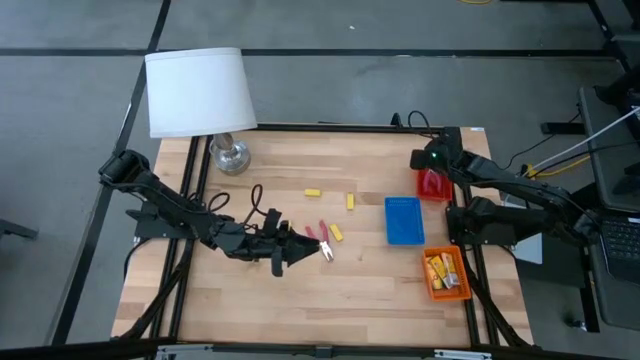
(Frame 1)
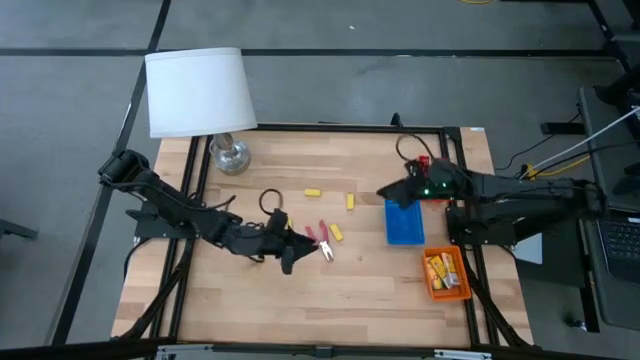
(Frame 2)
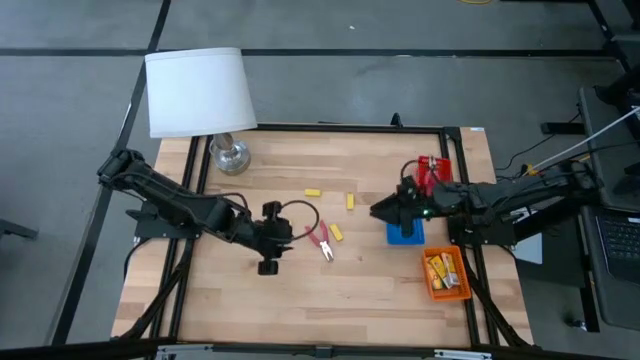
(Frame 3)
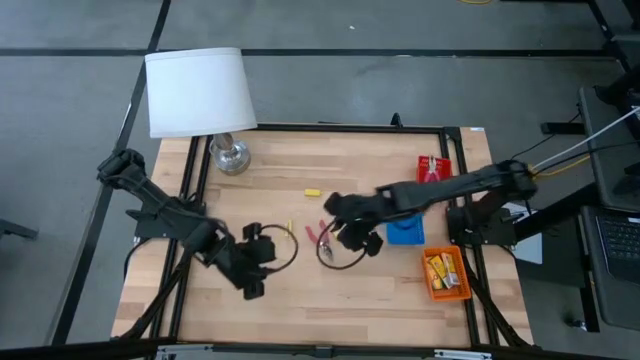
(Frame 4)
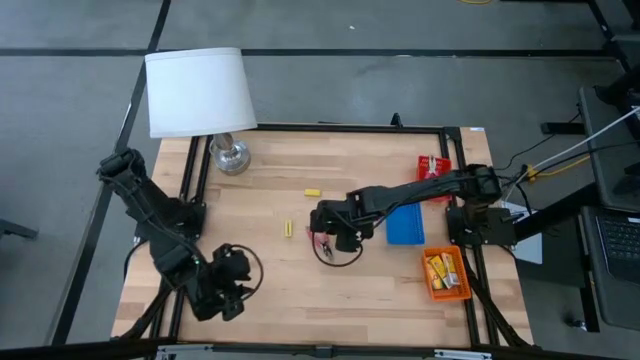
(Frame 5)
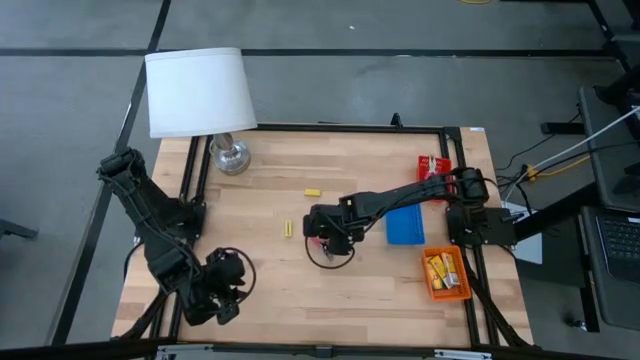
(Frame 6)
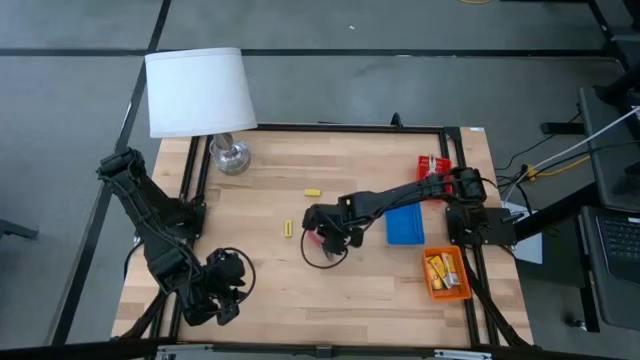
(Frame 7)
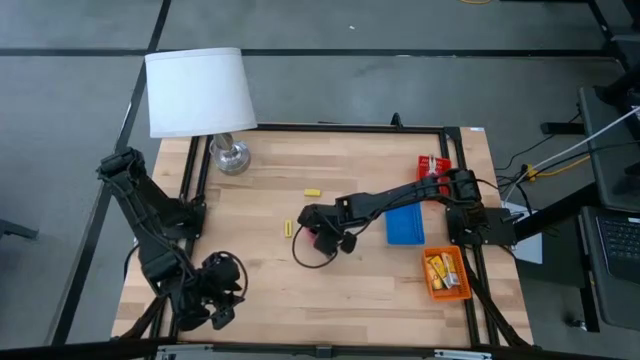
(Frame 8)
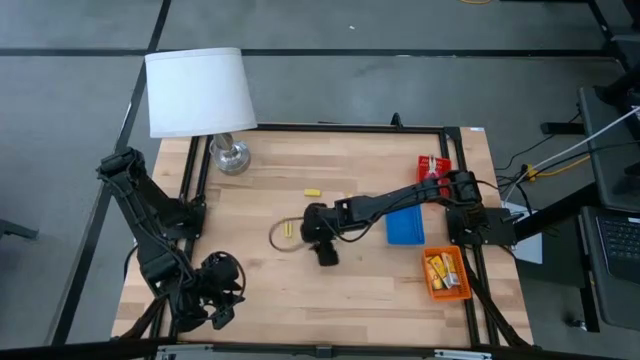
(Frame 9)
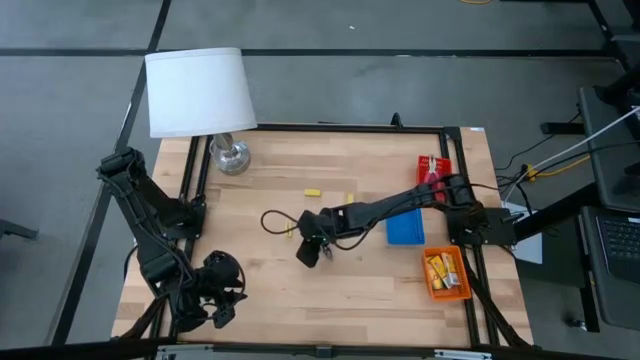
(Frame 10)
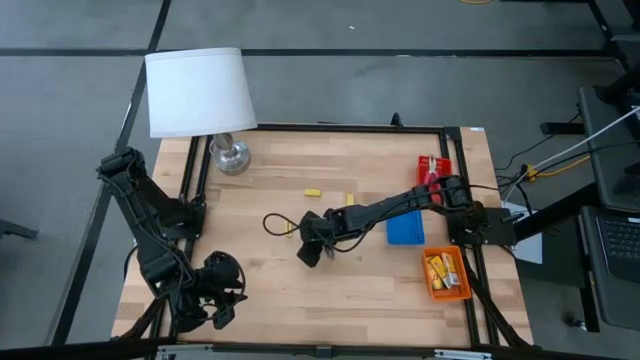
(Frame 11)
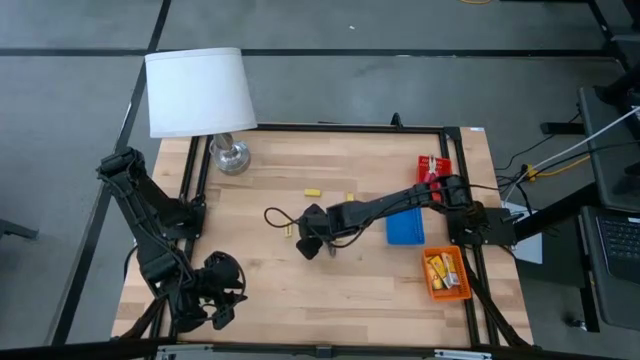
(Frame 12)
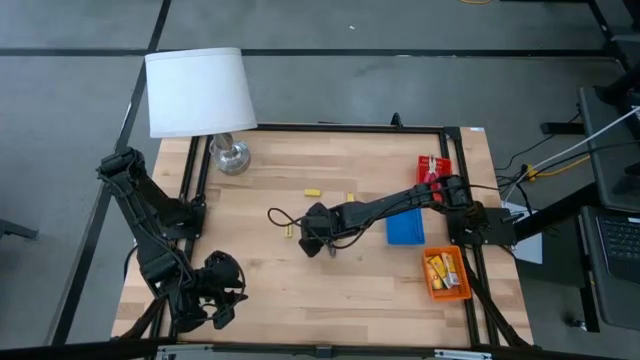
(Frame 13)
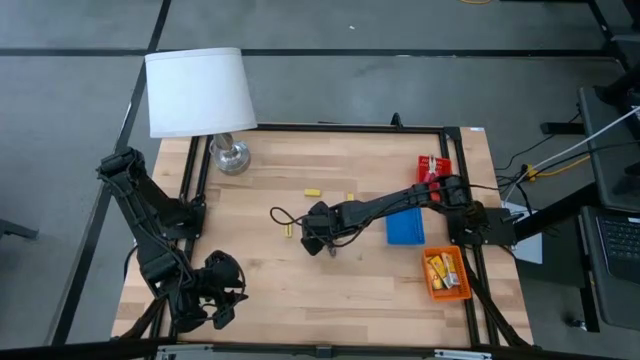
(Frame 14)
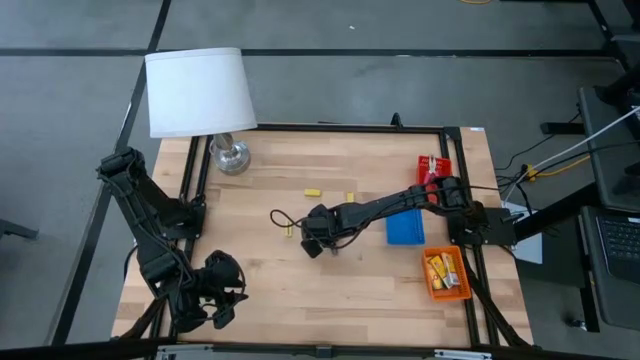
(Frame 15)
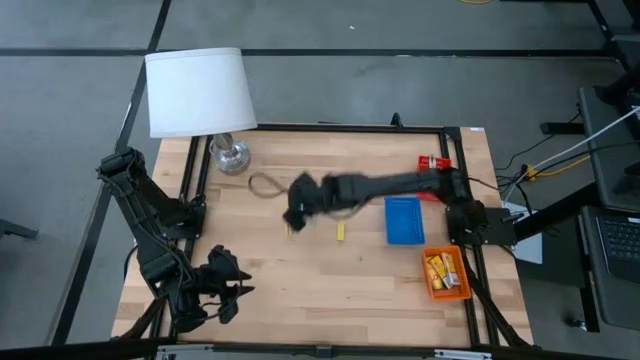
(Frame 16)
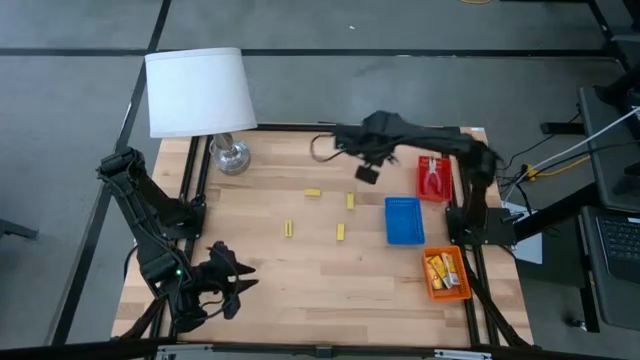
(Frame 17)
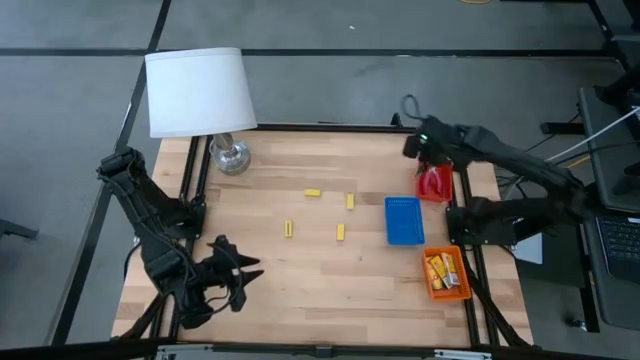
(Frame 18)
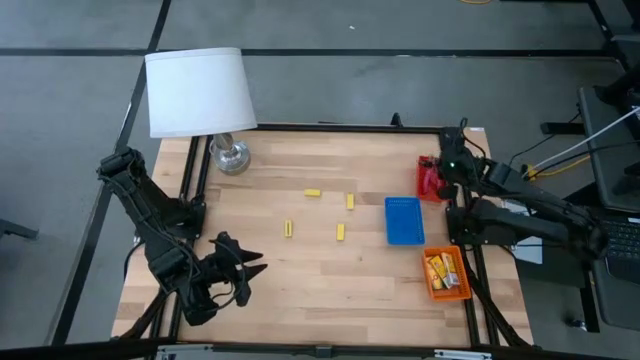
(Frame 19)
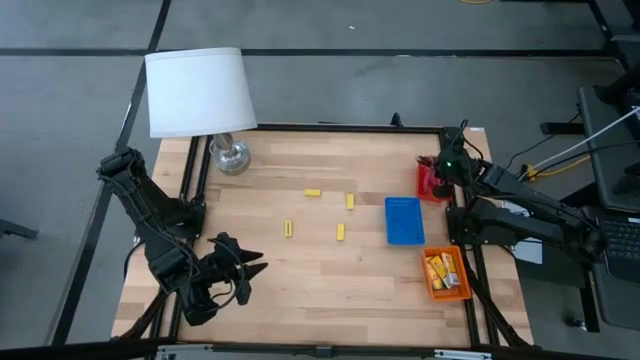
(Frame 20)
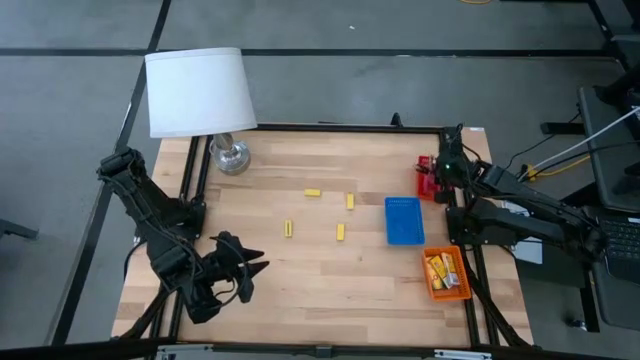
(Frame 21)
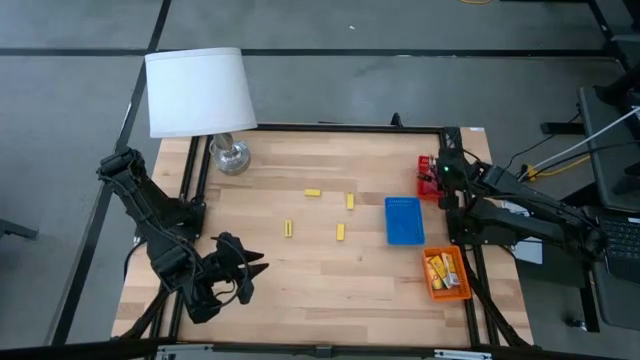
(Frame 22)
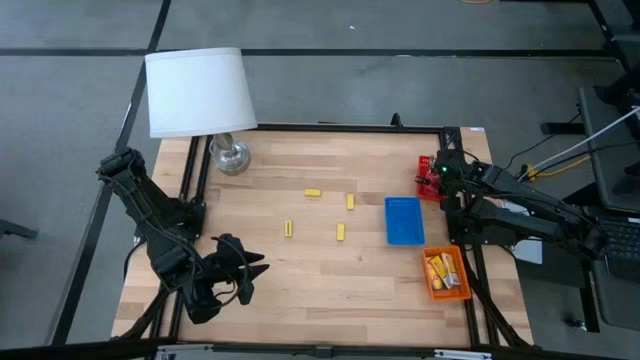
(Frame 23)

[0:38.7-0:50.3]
Task: Pick & Place School Supplies
Put the pink hole puncher into the red bin

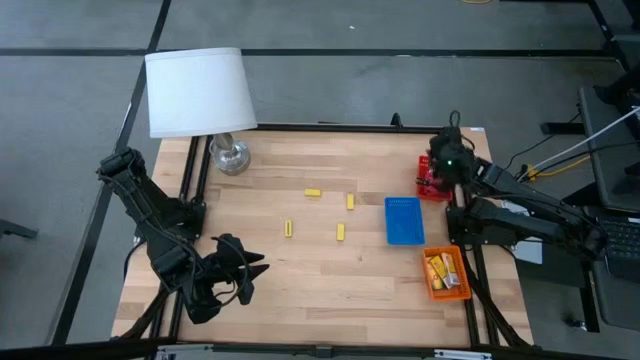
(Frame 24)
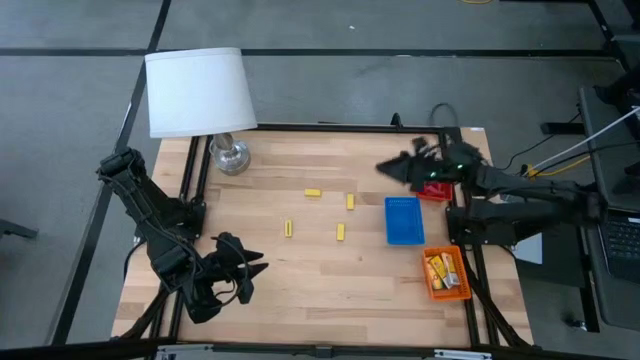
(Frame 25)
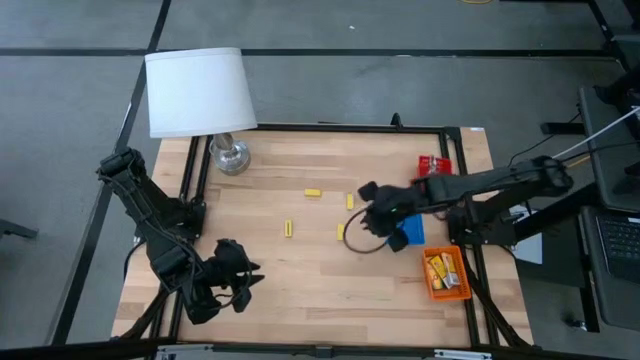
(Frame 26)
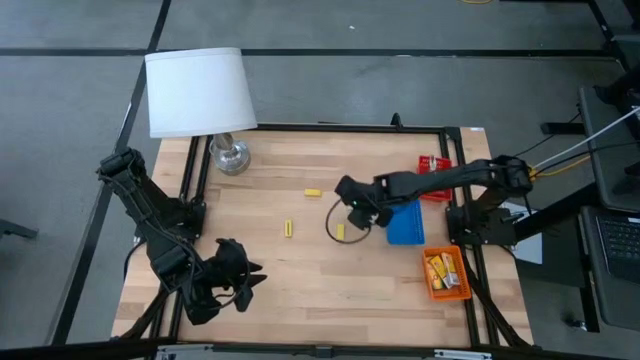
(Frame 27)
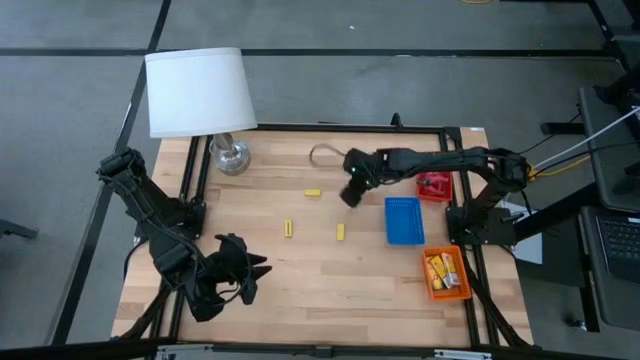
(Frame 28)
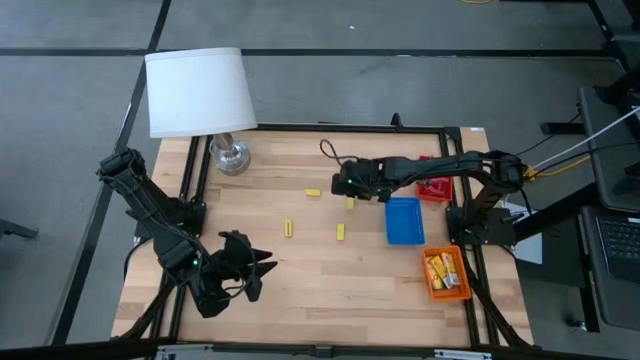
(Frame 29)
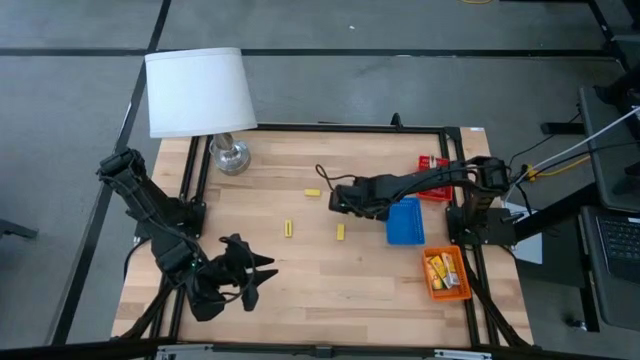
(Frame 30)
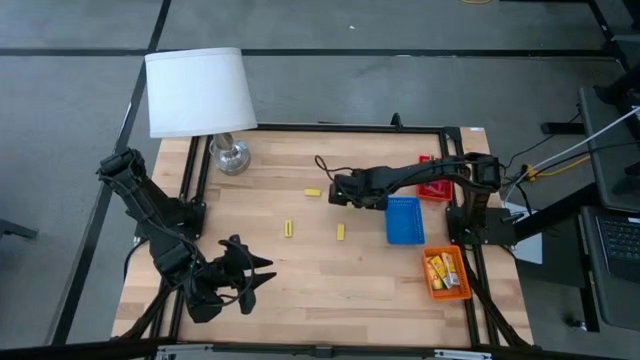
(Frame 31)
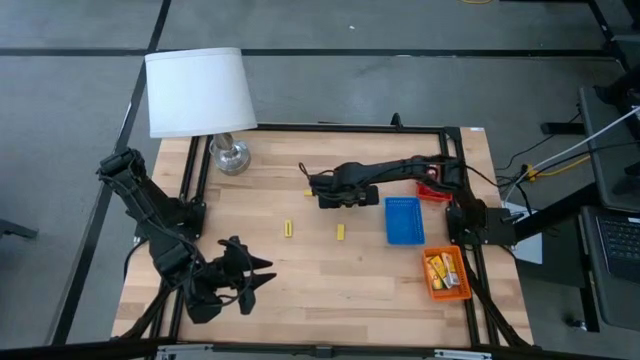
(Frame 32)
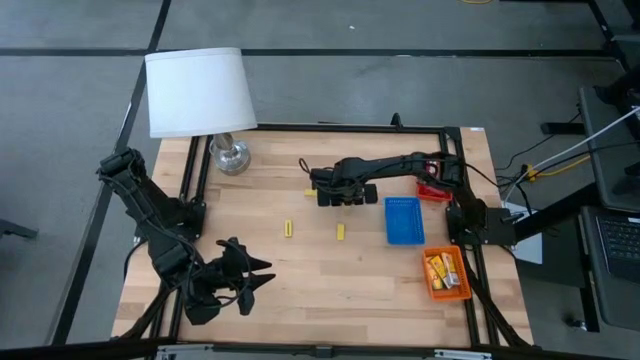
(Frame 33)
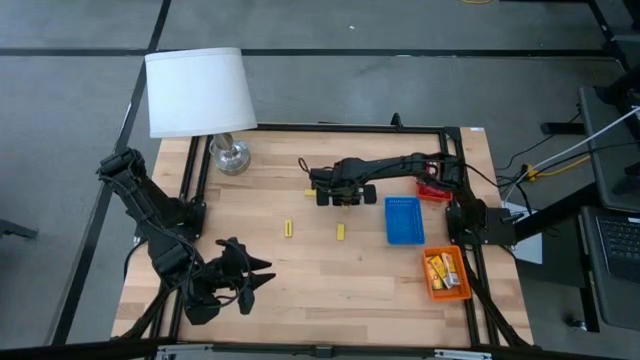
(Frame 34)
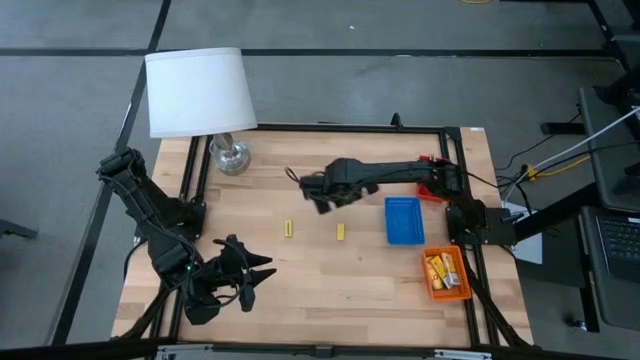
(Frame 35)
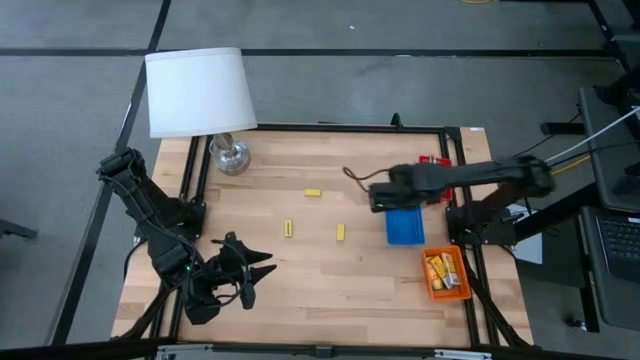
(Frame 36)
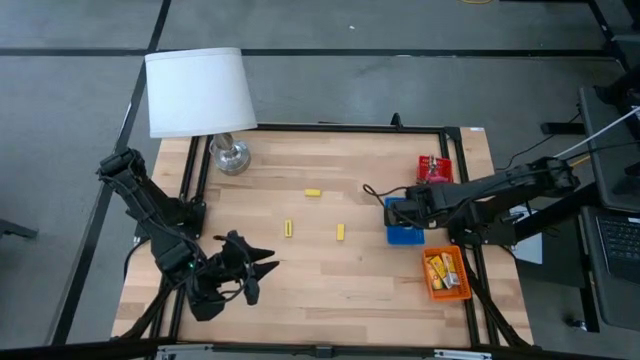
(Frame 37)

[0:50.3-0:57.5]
Put the top right yellow eraser into the blue bin

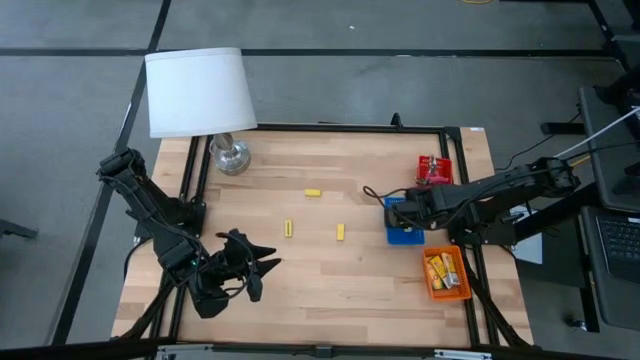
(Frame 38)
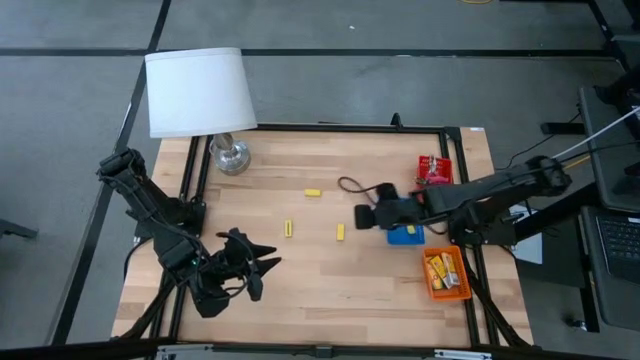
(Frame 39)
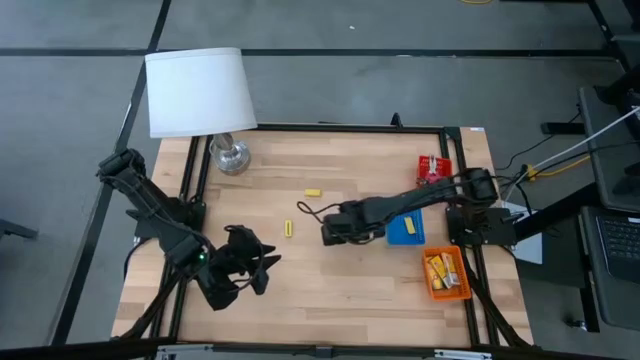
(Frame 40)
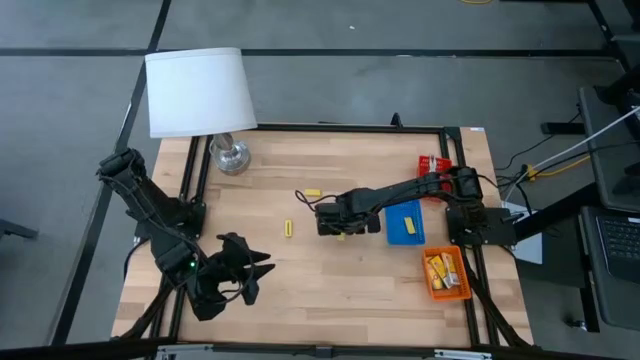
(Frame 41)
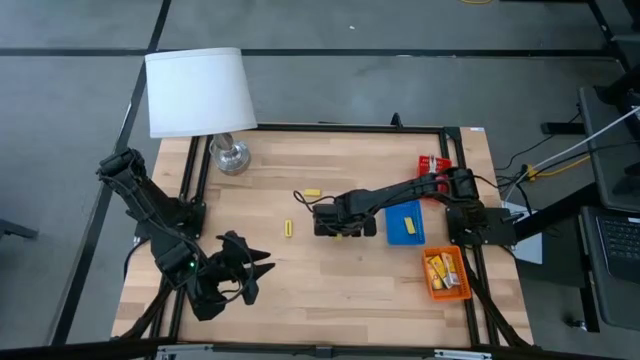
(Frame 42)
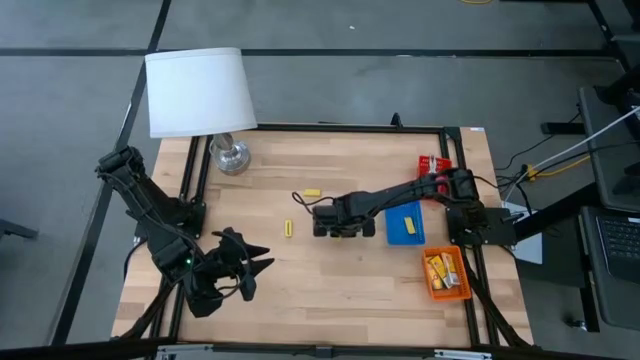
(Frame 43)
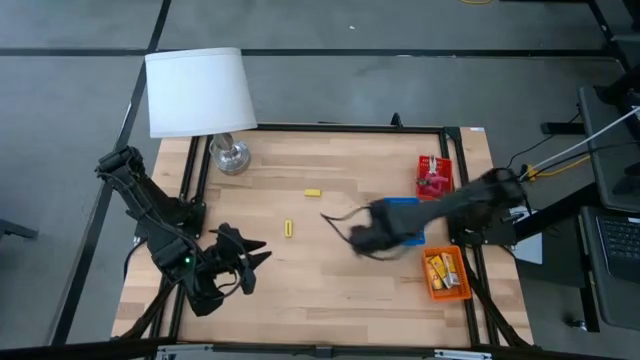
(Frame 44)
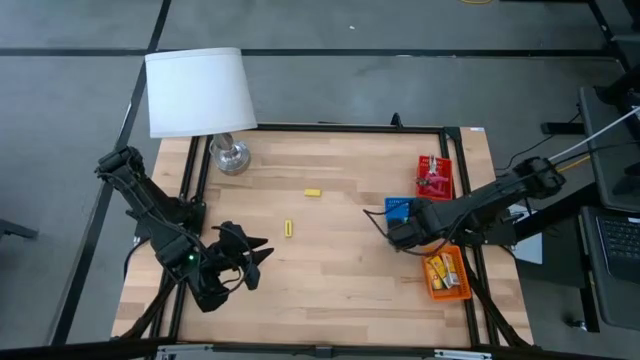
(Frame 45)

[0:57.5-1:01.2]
Put the bottom right yellow eraser into the blue bin
